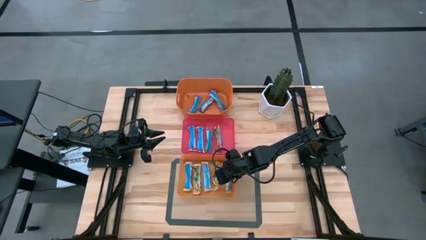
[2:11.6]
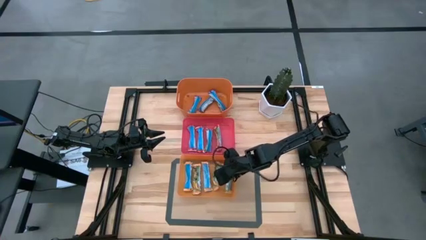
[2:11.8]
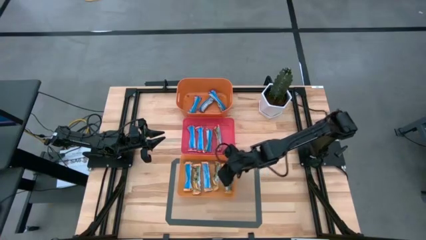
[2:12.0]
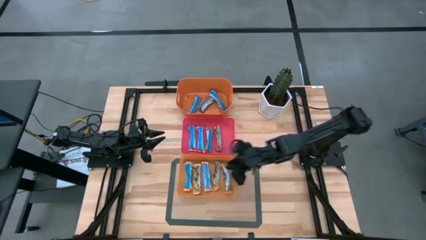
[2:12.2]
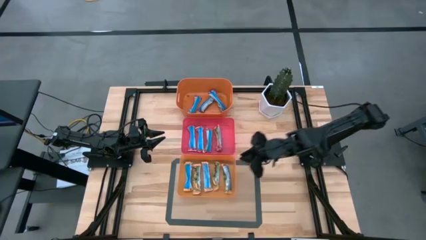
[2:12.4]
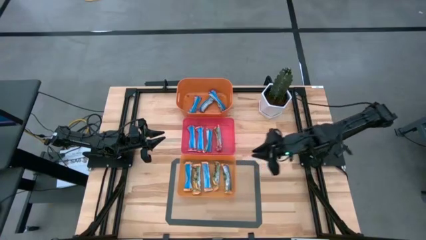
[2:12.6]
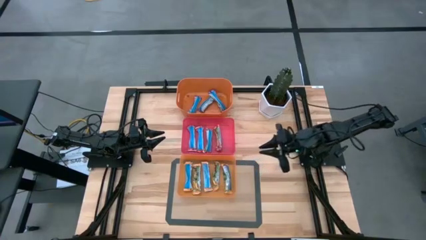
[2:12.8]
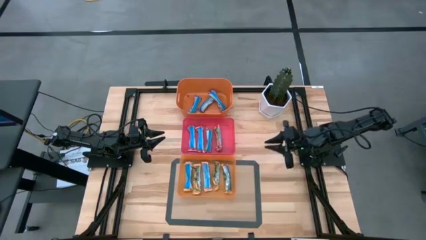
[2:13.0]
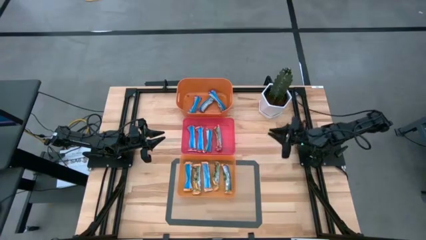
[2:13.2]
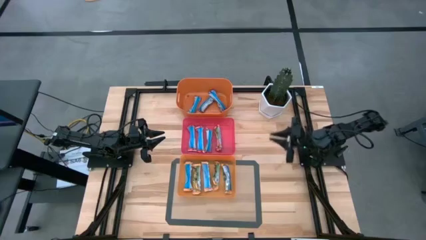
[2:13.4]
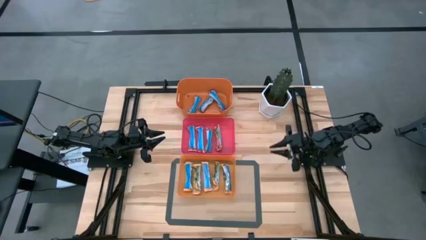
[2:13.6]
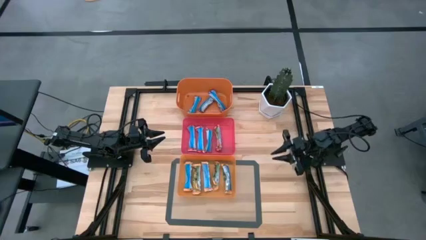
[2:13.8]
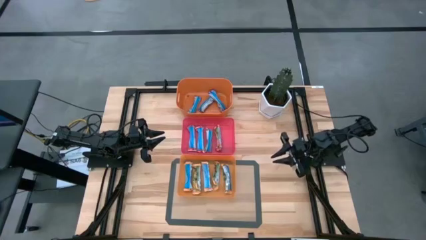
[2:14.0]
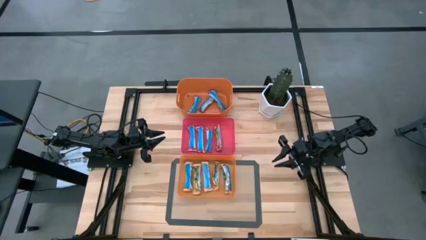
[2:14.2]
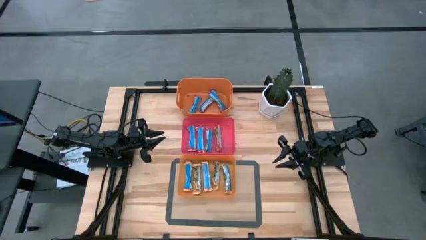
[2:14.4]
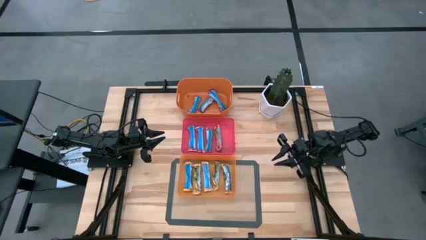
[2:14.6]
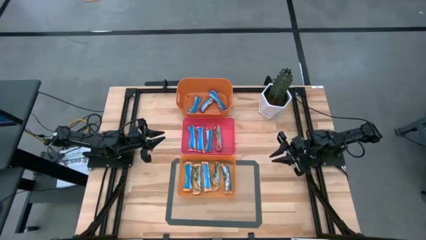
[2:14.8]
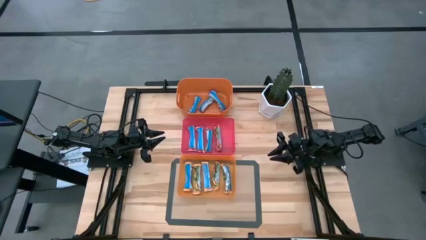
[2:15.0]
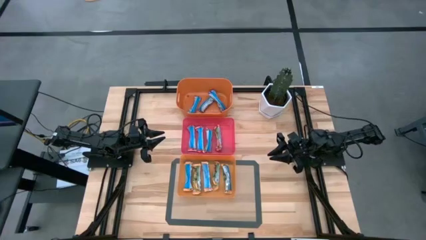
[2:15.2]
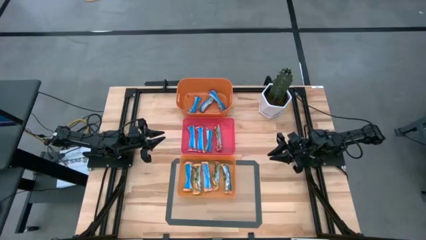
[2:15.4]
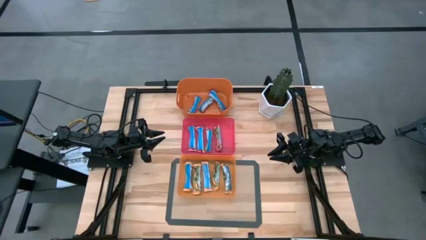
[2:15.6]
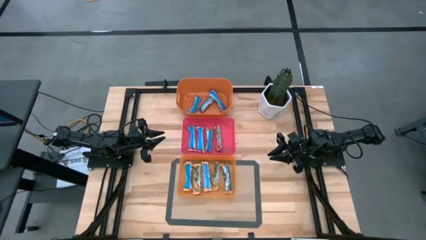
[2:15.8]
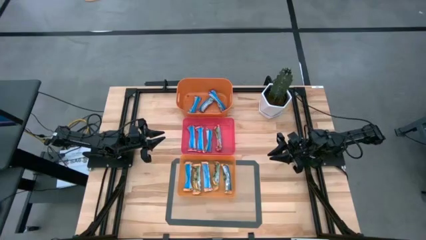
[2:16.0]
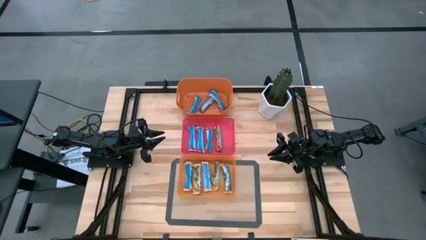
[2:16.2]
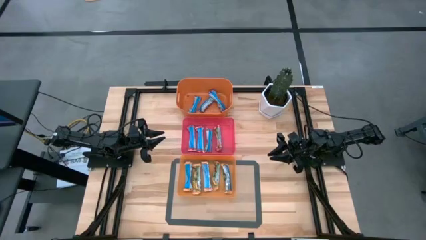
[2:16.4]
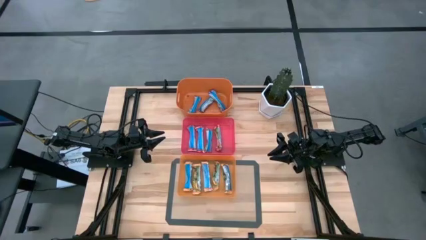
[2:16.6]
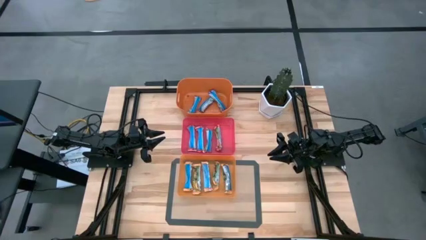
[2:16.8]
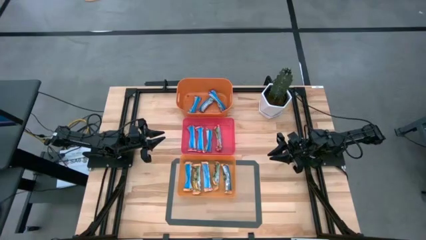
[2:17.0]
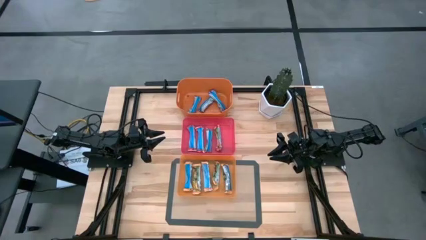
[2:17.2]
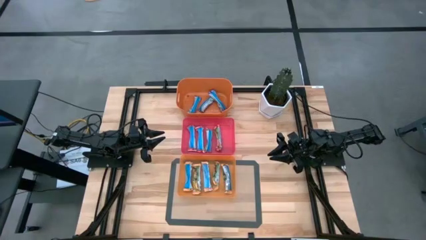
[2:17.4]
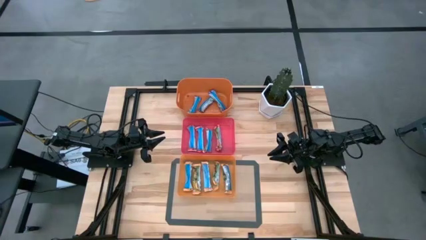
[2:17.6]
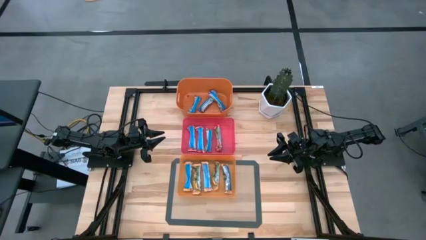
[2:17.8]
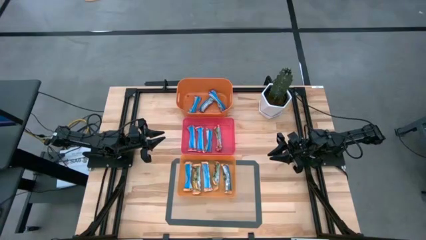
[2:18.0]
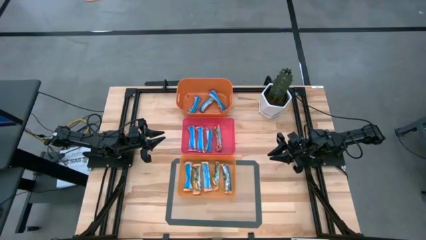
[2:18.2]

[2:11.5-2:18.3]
Task: Pick and place Granola Bars by type
Return to Home Position

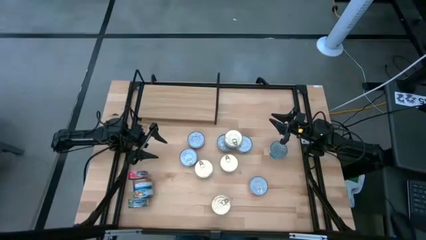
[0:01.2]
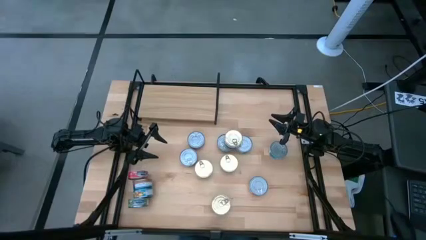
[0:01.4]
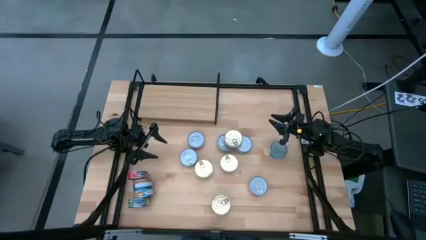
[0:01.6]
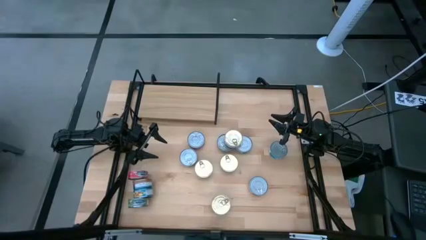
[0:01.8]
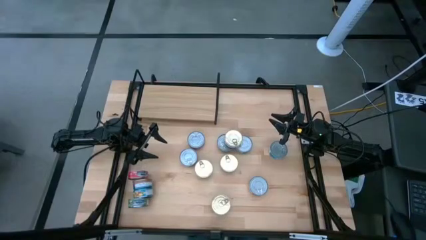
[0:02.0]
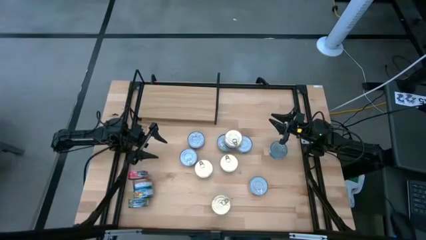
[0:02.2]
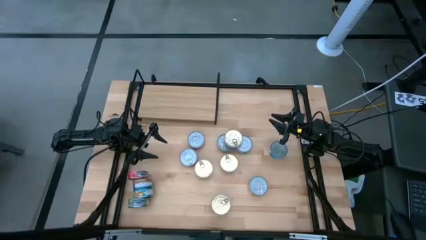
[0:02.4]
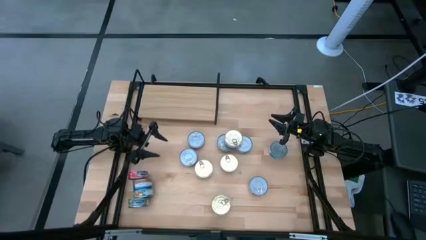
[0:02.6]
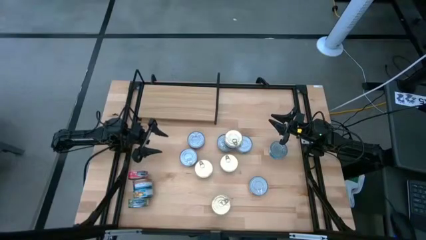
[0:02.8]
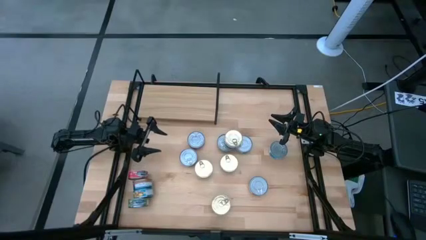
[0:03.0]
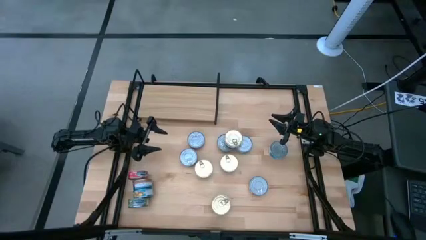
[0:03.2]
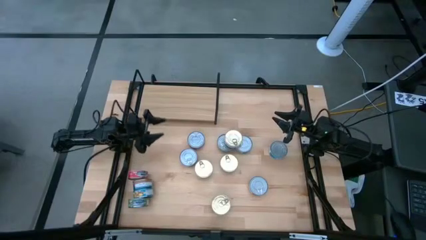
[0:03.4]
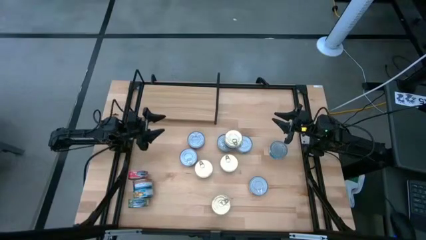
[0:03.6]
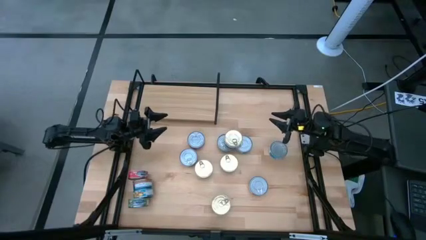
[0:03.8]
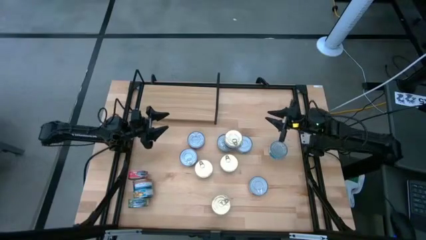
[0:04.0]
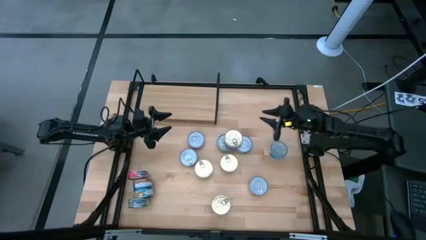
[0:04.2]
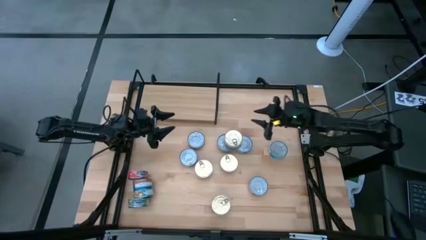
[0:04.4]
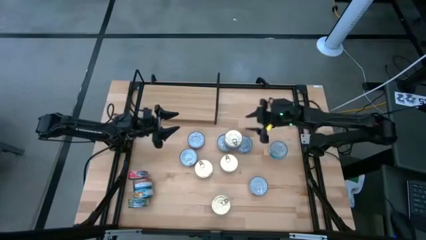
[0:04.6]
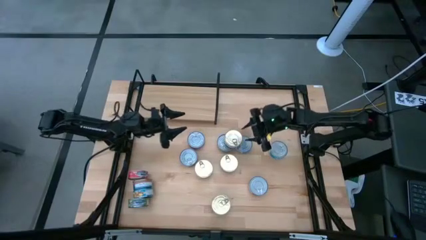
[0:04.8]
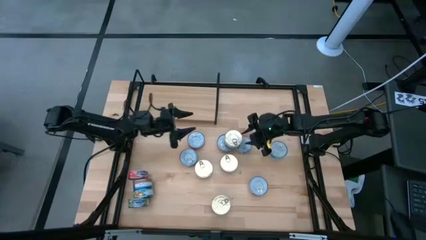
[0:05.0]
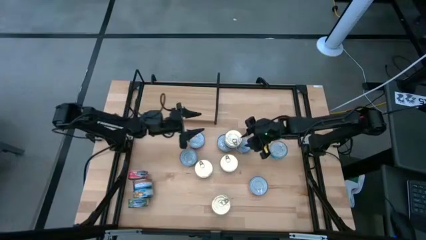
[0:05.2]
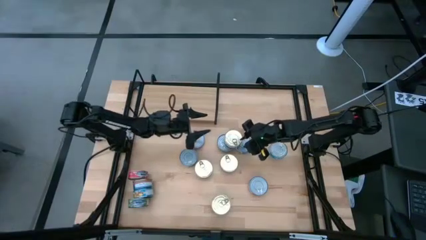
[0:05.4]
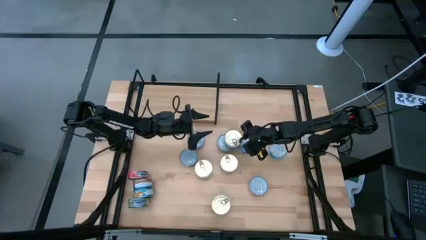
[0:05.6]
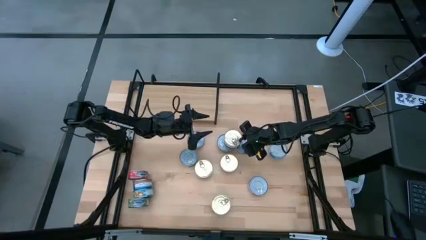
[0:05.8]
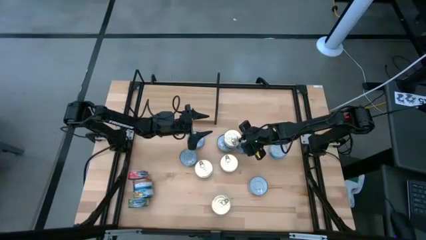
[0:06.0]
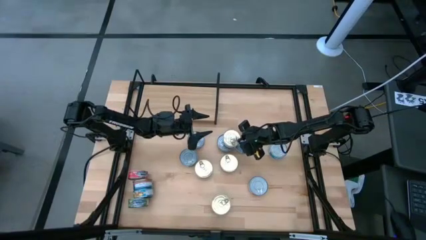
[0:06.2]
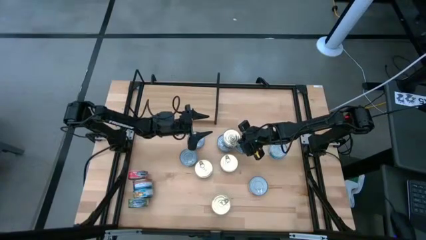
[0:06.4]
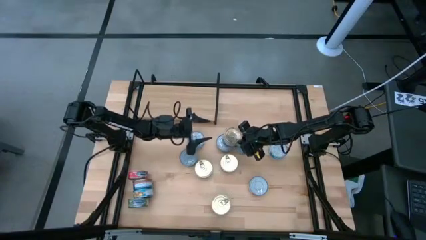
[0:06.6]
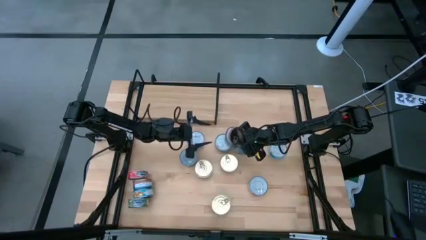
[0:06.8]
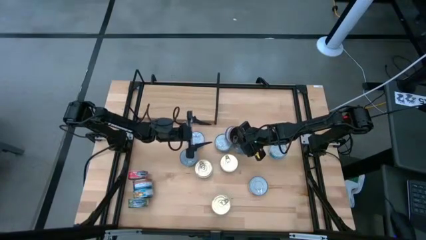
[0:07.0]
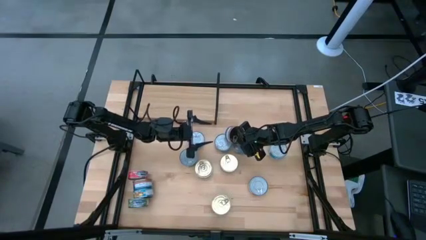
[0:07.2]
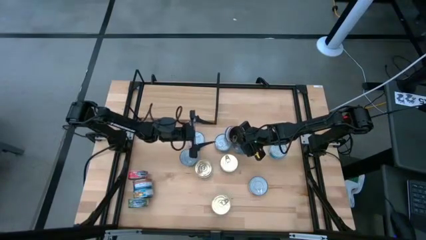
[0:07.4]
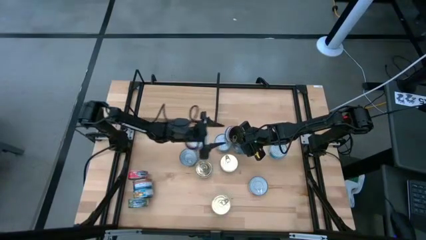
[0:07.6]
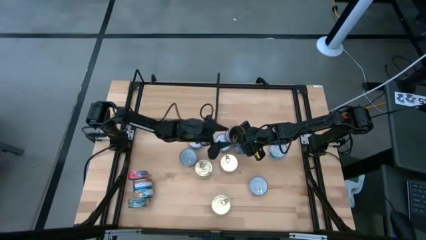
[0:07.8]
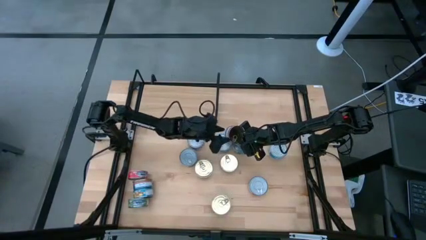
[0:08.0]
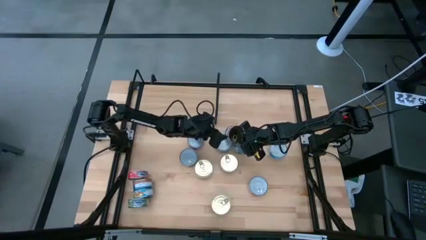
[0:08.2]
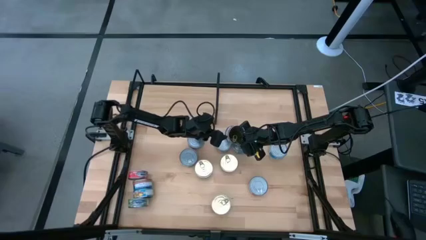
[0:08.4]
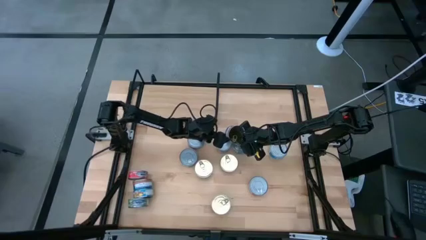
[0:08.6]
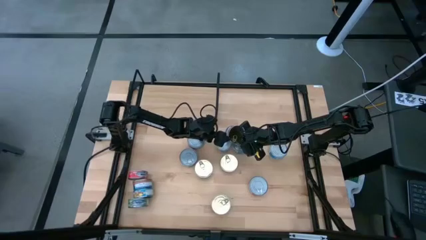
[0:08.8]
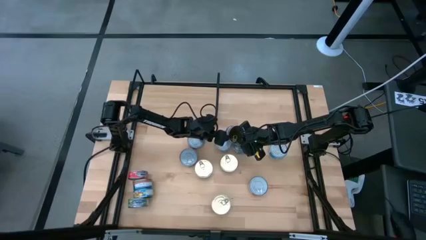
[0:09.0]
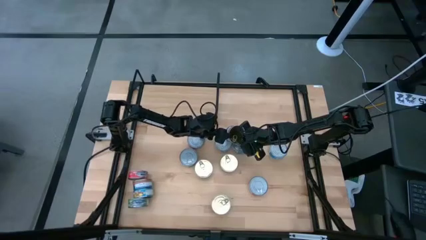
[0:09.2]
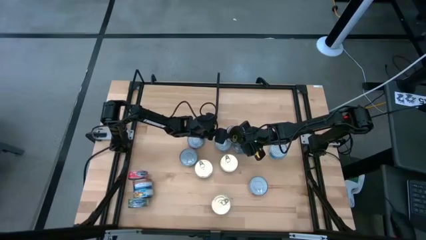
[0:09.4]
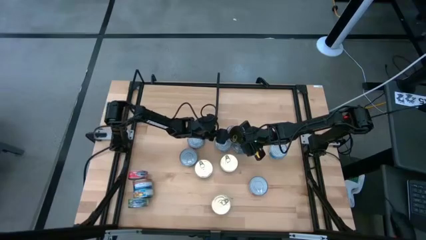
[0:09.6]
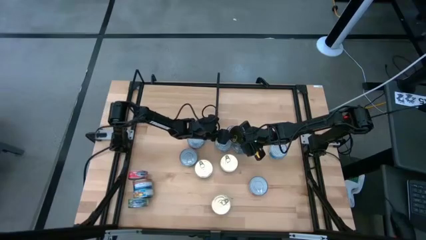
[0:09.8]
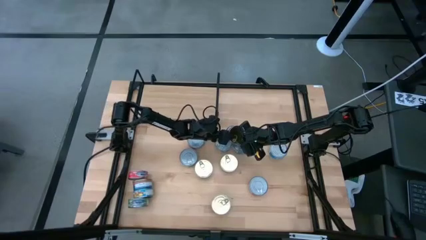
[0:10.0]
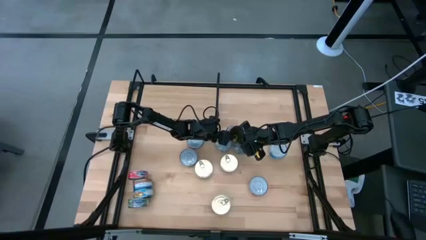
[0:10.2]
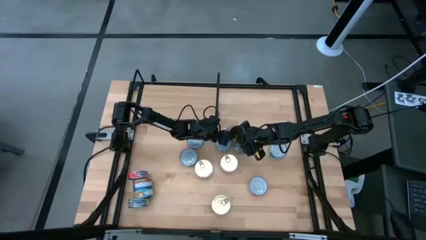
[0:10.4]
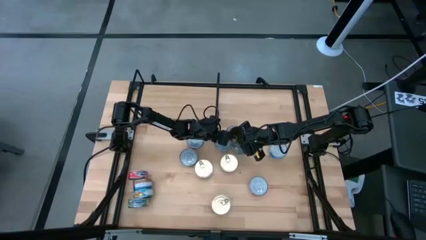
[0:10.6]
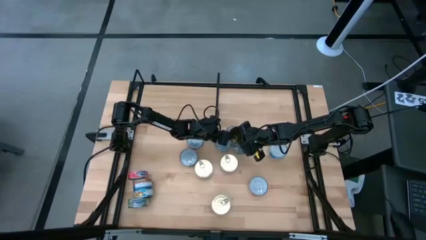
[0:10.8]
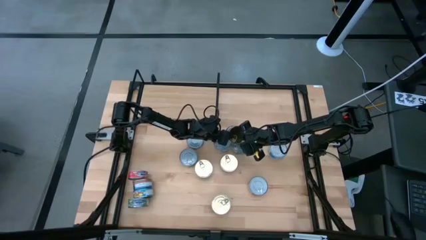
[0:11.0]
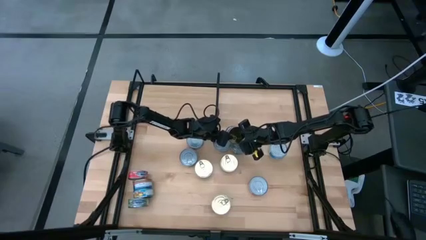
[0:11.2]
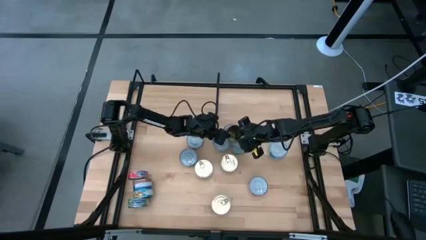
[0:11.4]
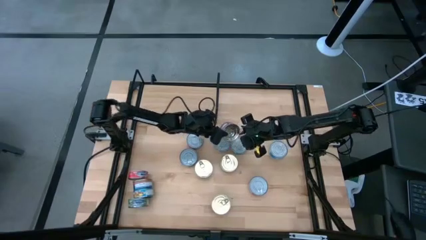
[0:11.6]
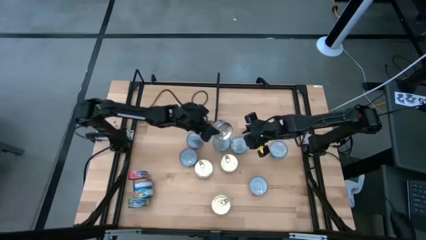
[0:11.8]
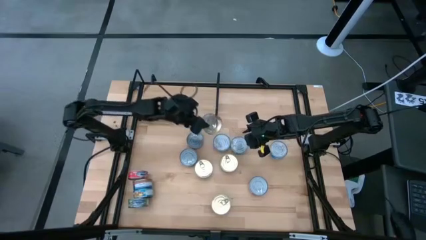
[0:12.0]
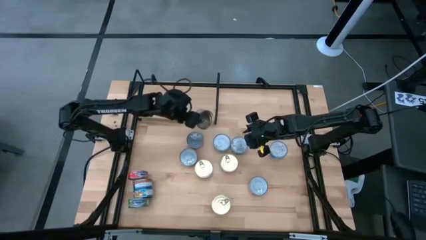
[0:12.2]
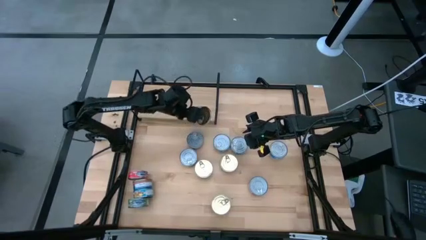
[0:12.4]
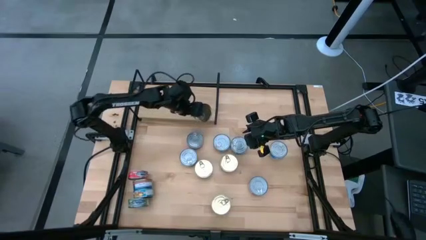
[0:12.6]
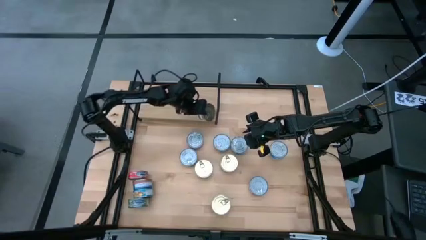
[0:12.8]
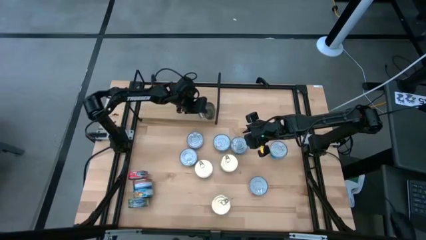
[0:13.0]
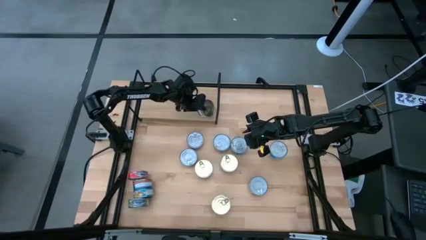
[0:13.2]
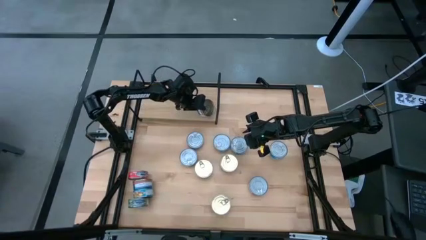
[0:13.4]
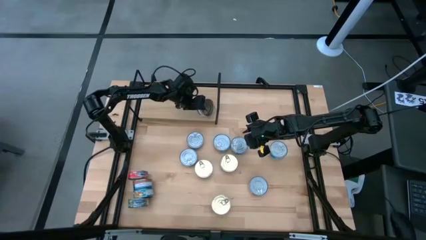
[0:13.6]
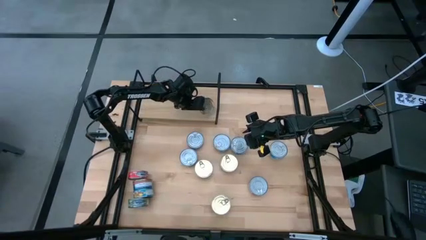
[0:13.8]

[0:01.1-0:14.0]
Task: Stack canned seafood by type on shelf
Put the blue pink tuna can on the shelf
